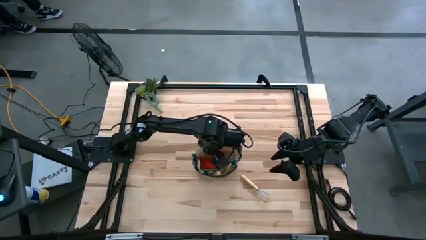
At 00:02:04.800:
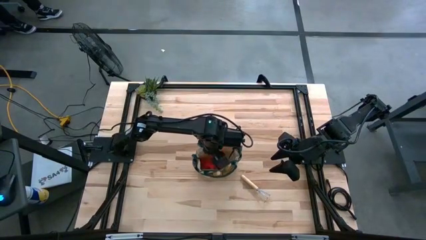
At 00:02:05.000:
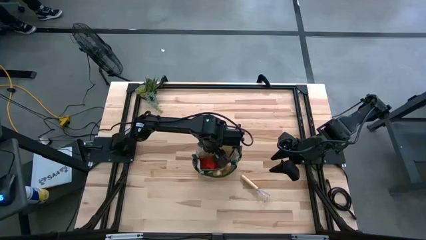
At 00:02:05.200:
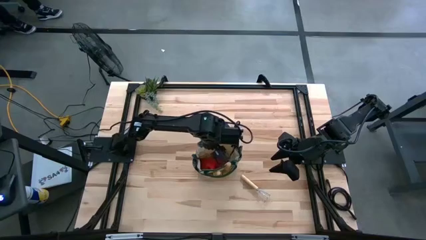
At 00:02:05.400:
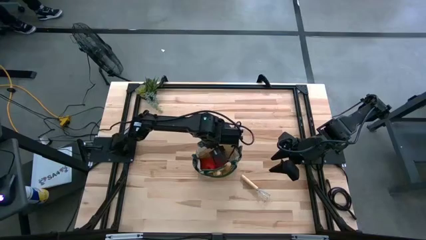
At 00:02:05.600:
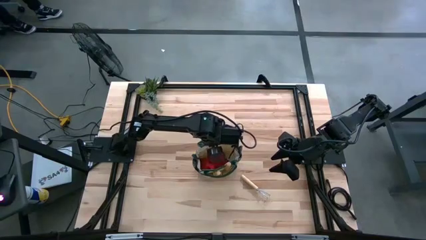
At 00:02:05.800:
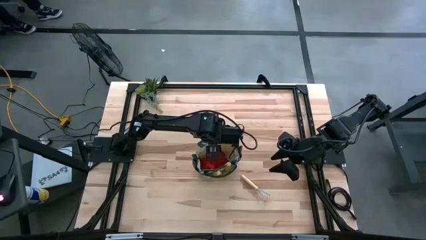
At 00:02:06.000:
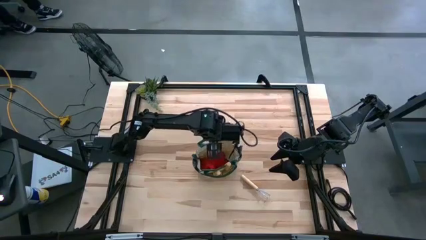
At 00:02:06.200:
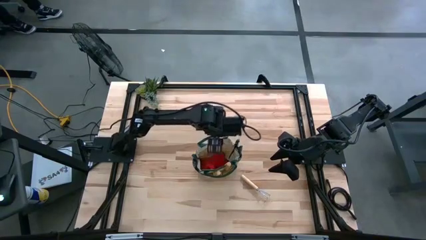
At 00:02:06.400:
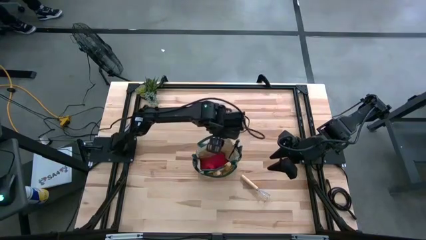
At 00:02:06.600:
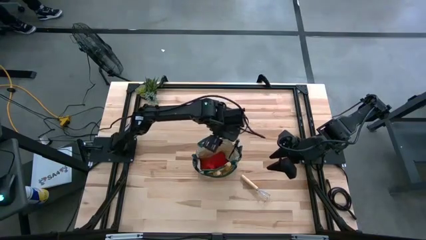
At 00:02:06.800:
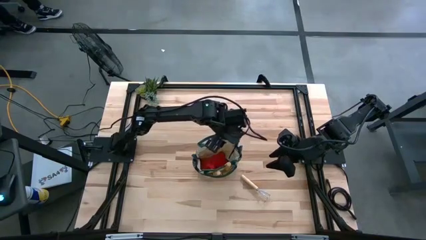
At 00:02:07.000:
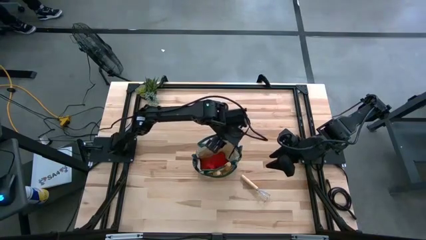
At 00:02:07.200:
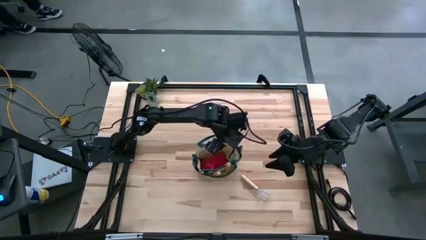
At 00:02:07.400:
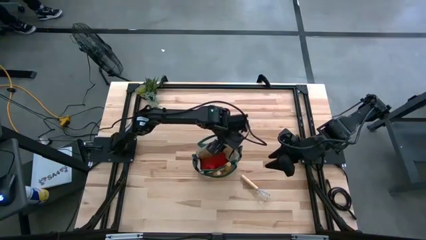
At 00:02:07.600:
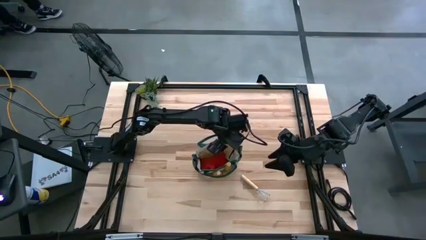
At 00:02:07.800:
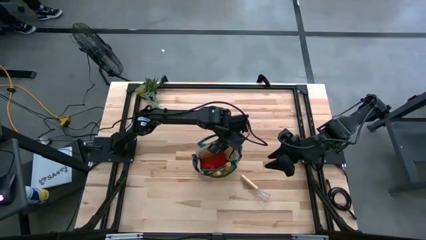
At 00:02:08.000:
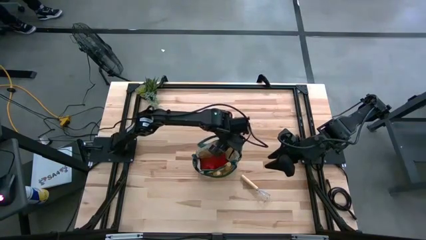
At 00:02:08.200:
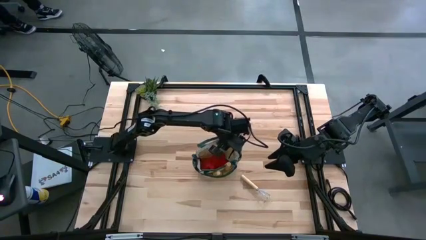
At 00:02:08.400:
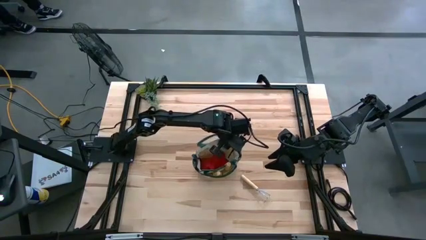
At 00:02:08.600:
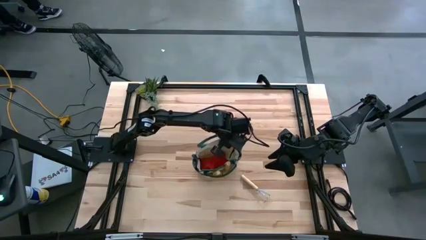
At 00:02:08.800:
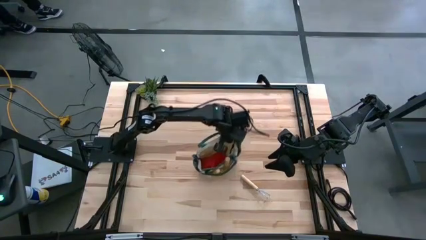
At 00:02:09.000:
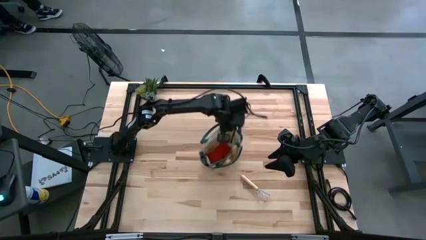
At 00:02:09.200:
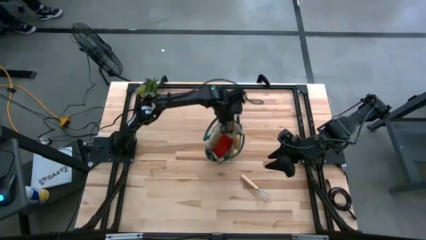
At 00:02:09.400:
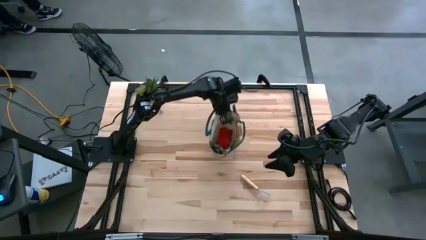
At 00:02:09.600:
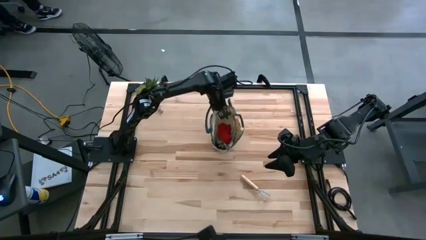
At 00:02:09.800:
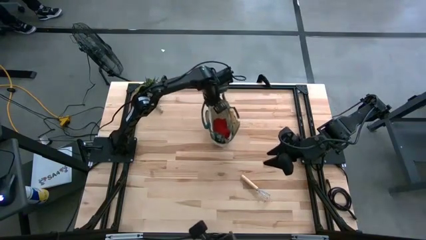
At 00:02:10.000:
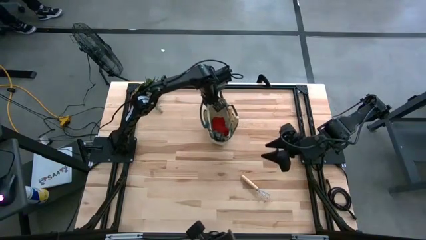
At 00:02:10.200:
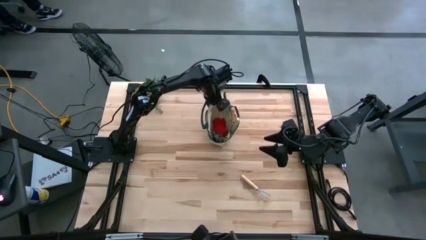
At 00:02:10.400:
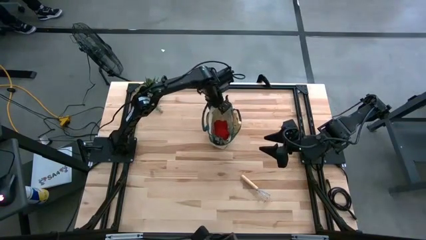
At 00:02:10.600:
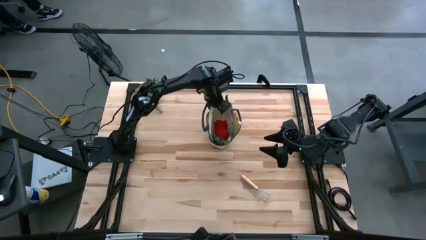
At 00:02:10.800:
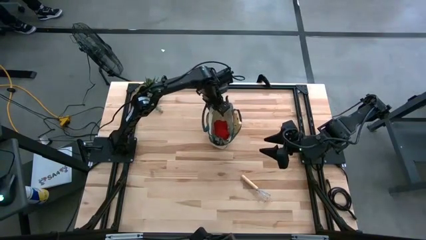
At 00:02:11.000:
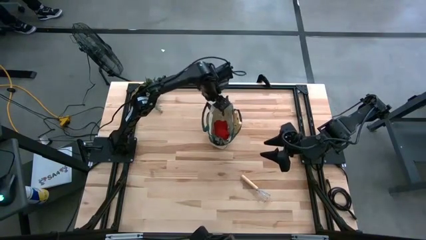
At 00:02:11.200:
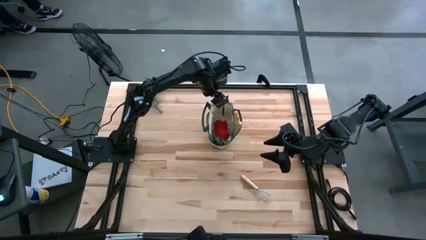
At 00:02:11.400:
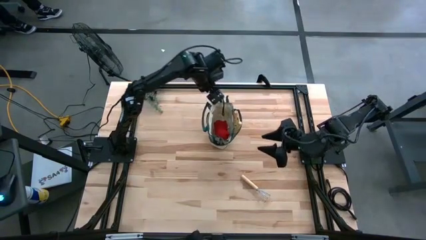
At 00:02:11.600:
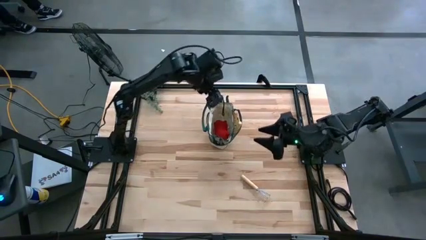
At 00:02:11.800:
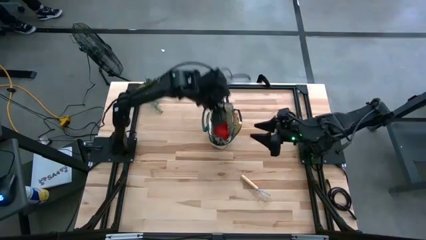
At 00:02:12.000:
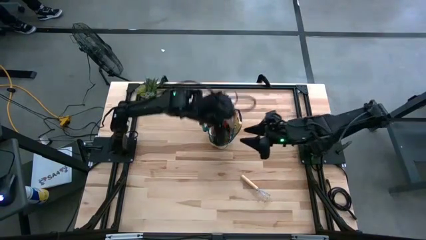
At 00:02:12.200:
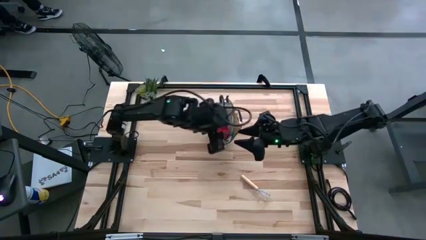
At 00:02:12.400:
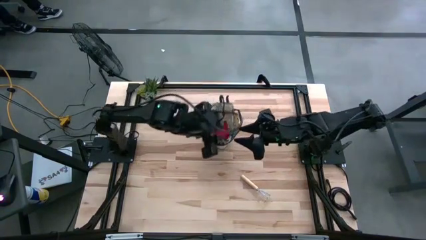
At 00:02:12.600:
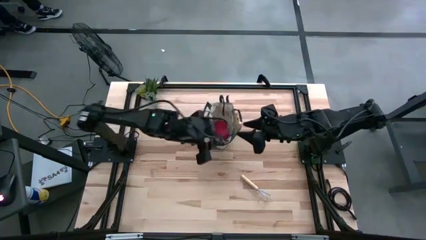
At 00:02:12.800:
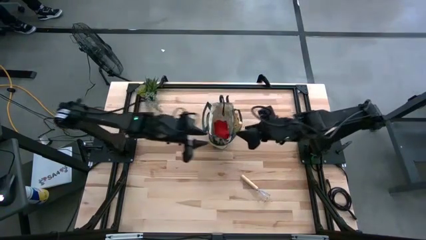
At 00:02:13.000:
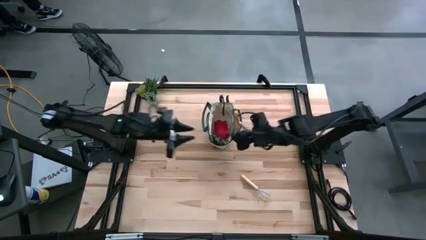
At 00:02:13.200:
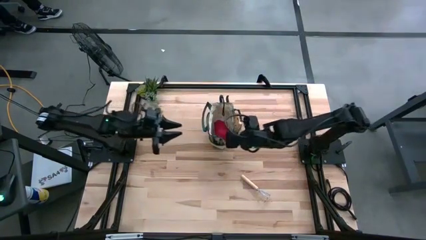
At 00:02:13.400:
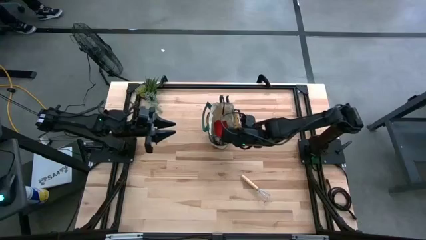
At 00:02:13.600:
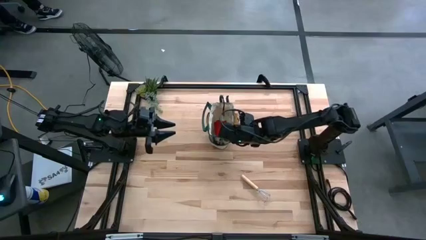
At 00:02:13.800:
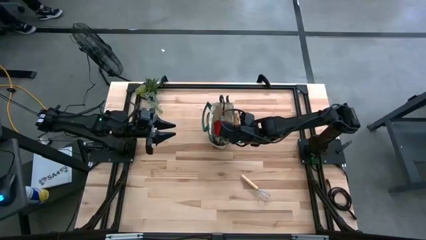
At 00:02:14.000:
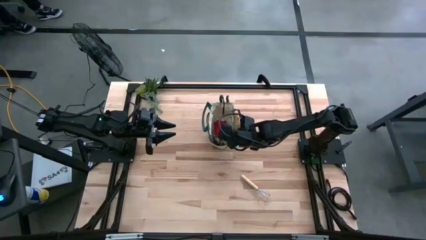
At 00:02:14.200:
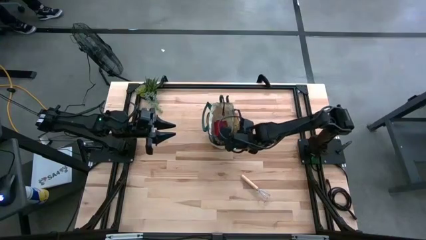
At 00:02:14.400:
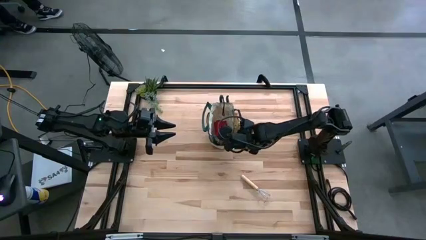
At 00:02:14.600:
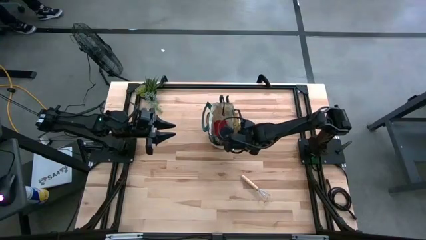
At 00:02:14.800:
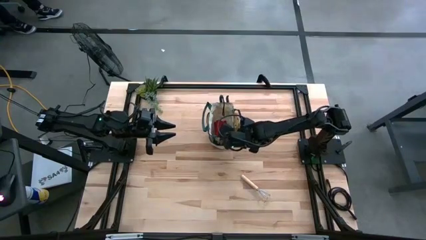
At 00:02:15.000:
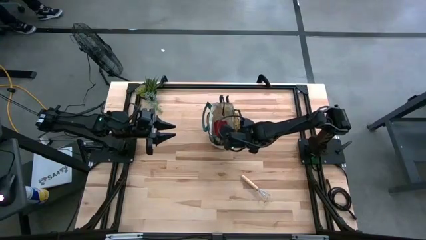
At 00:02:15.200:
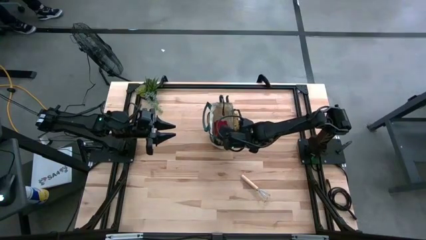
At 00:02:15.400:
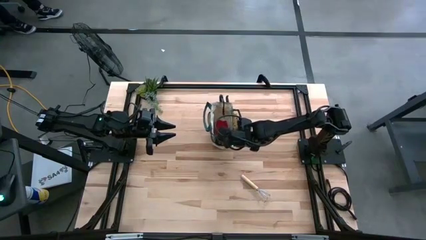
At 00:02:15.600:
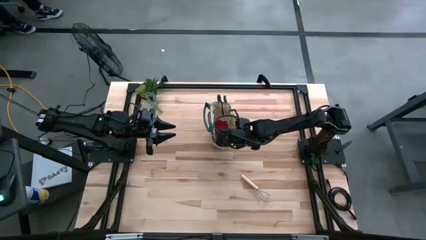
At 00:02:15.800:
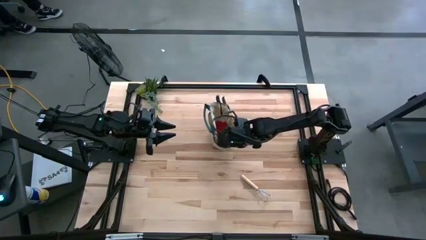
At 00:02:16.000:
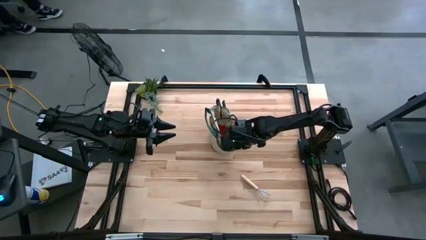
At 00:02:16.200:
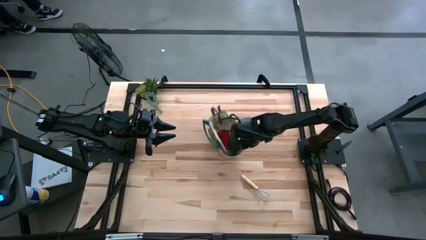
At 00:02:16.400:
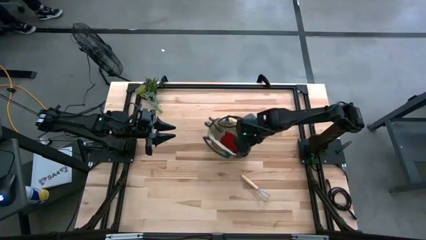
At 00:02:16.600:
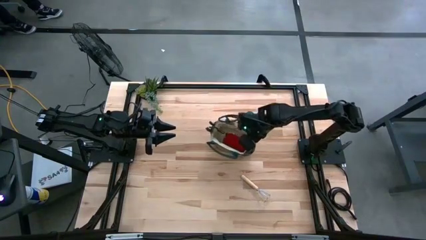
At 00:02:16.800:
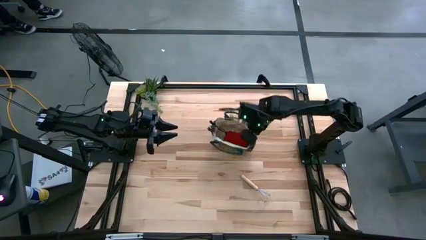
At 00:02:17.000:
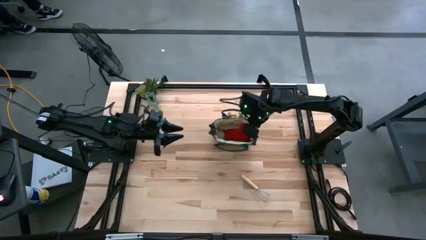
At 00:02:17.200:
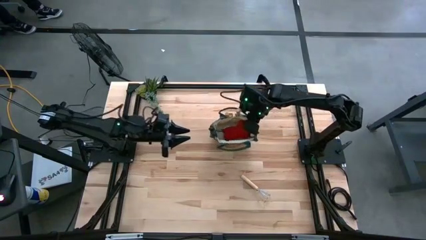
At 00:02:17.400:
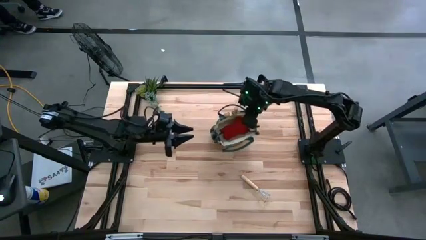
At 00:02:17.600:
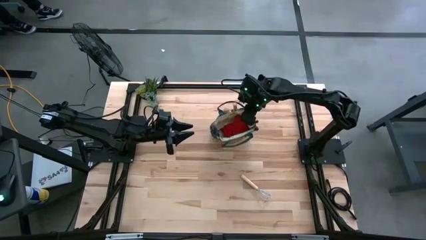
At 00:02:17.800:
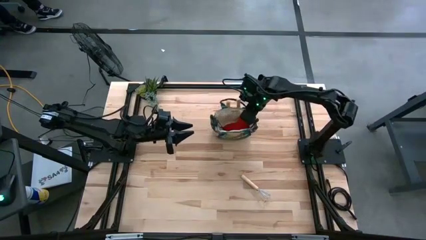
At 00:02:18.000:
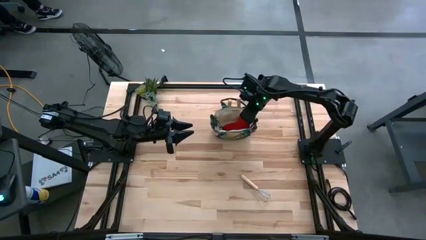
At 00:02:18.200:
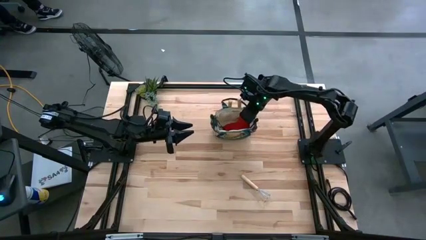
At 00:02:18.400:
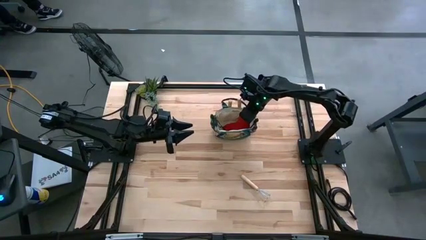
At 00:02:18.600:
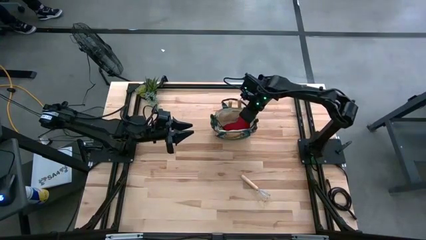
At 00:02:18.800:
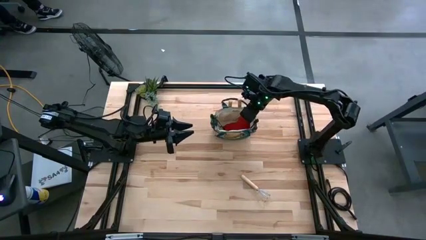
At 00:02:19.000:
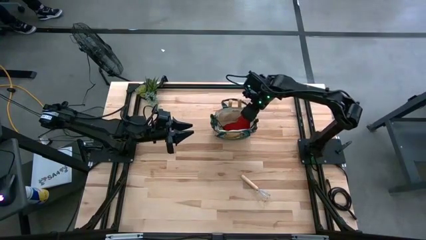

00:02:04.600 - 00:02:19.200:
Task: Pick & Place Garden tools in Gardening bag
Adjust the white gardening bag
